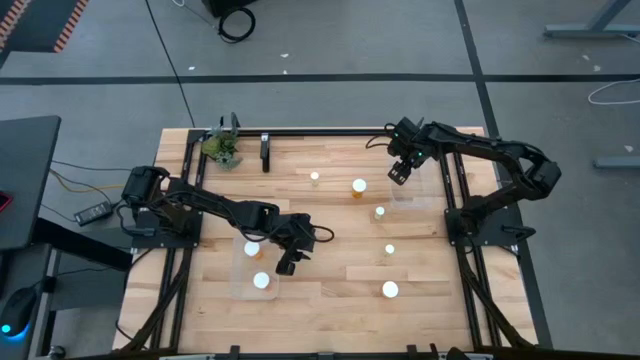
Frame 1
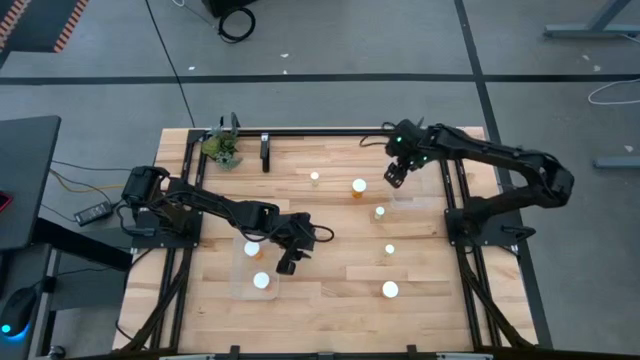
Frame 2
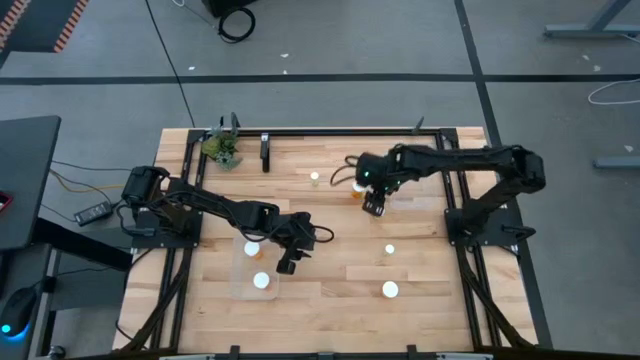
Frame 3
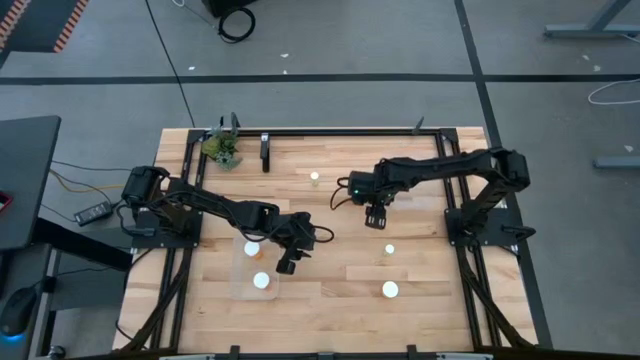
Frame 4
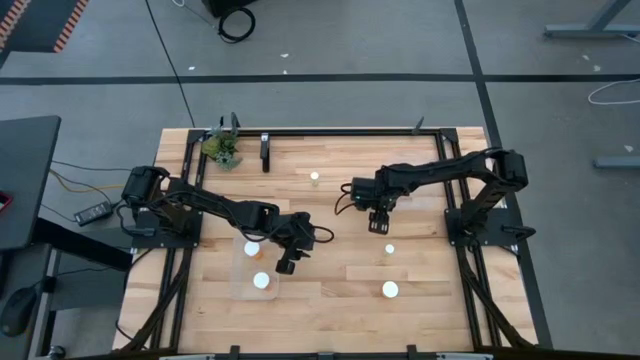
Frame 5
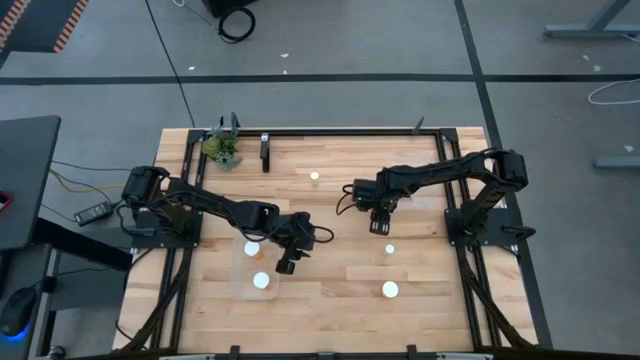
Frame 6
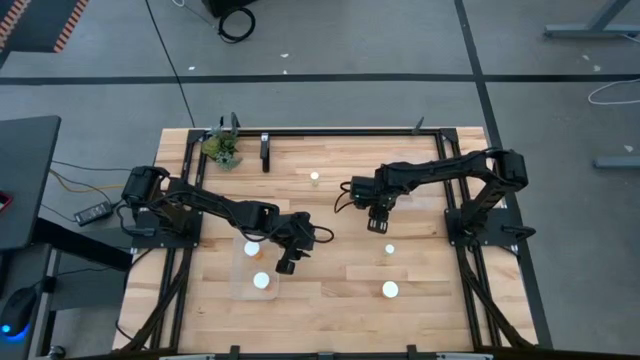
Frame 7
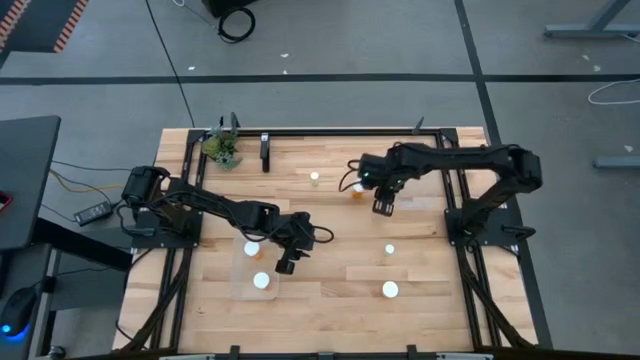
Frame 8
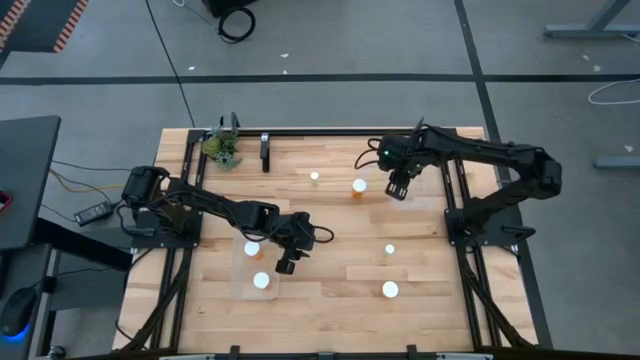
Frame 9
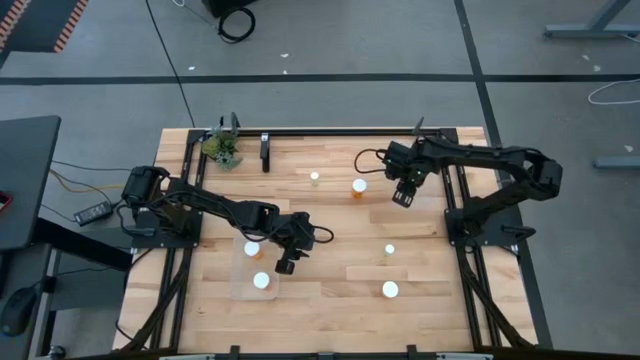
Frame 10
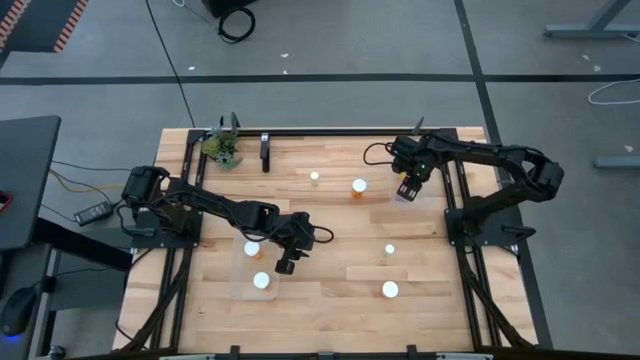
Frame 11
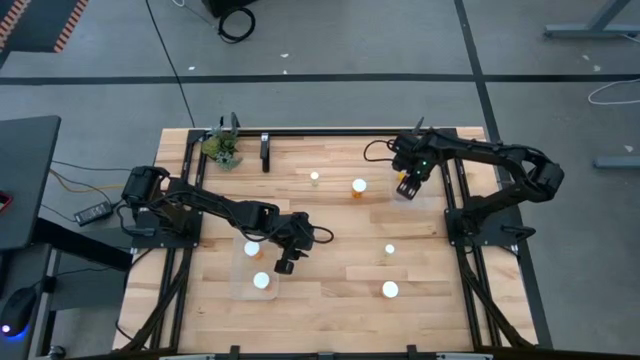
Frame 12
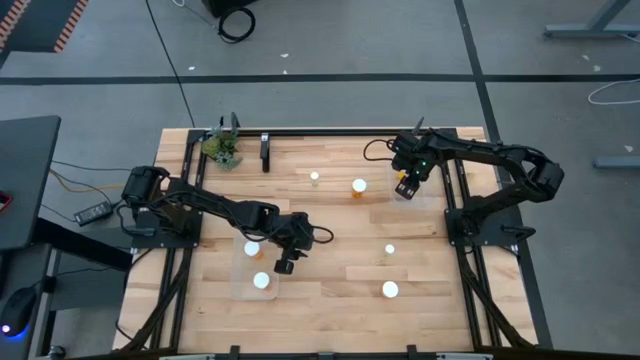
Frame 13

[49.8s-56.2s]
Task: Pick and place medicine bottles into bin by pill shape (circle, oval)
Put the middle yellow pill bottle into the top transparent bin

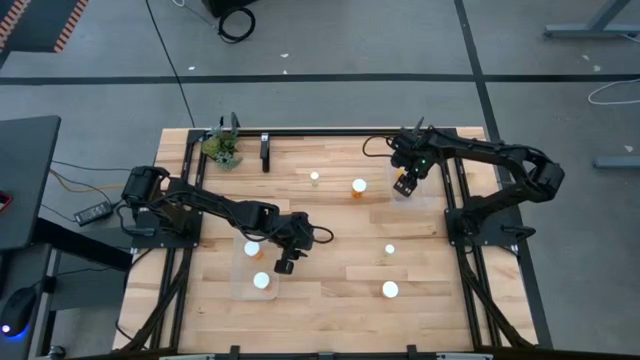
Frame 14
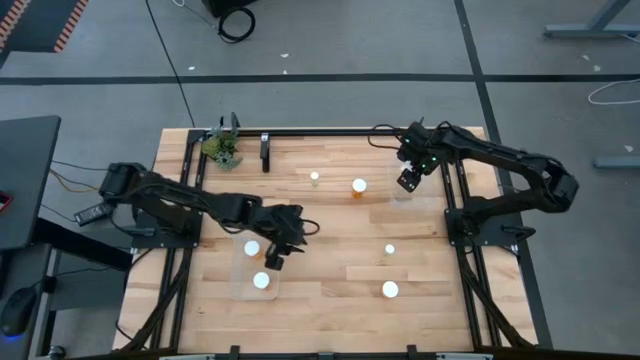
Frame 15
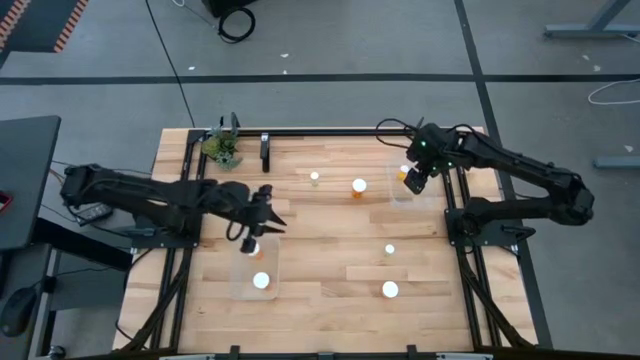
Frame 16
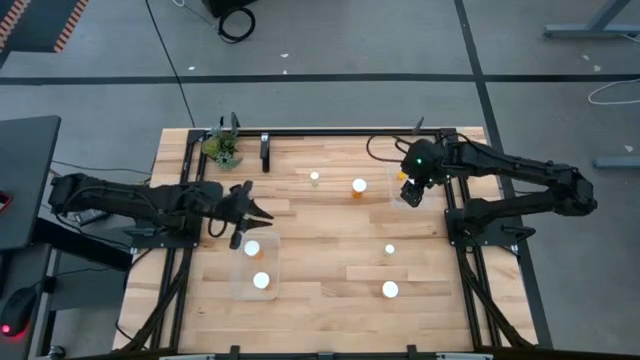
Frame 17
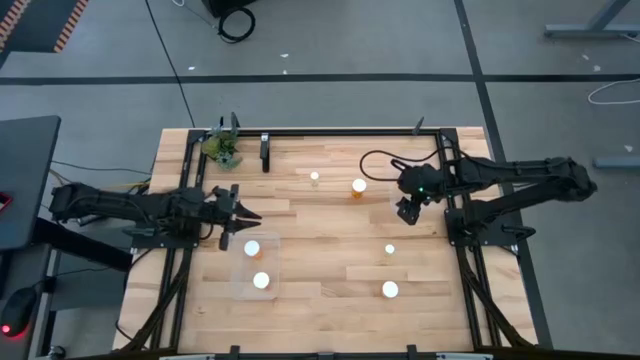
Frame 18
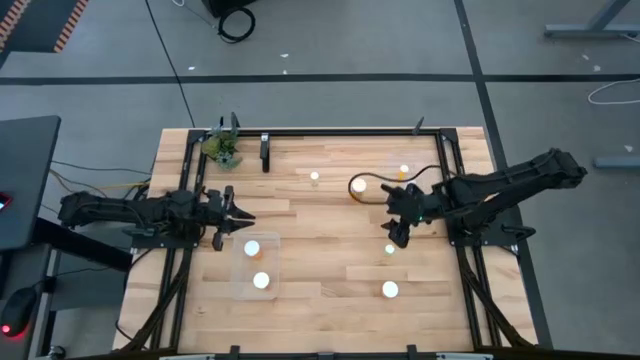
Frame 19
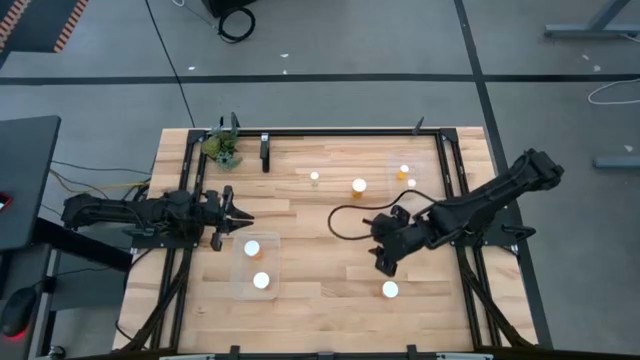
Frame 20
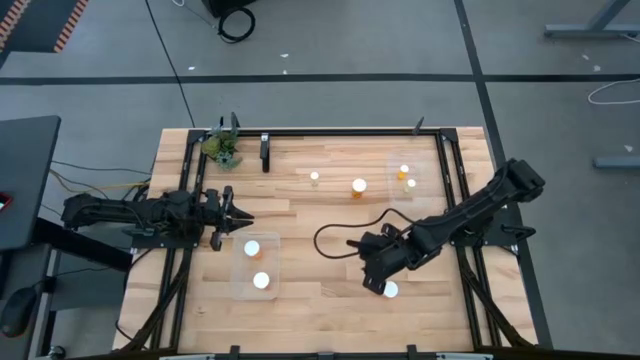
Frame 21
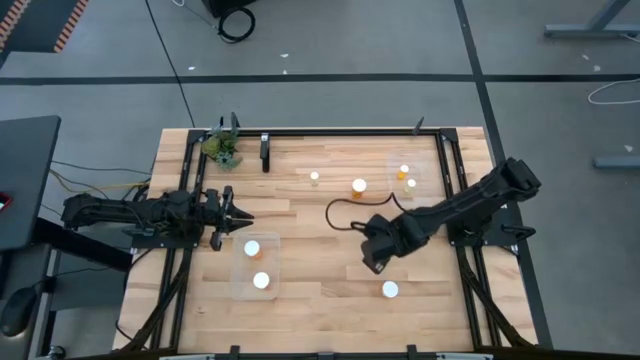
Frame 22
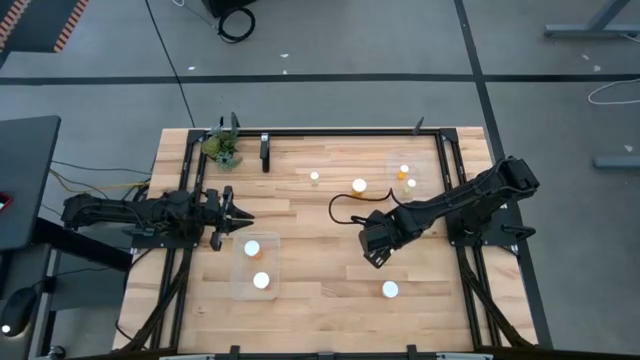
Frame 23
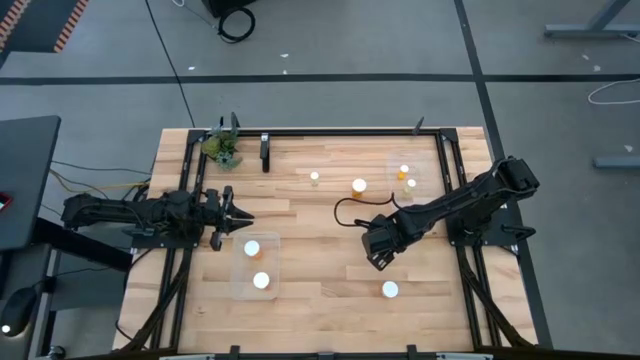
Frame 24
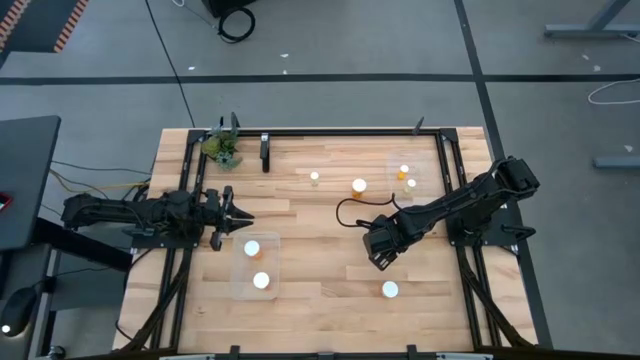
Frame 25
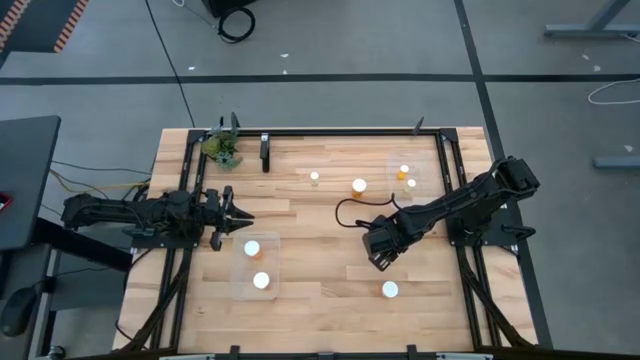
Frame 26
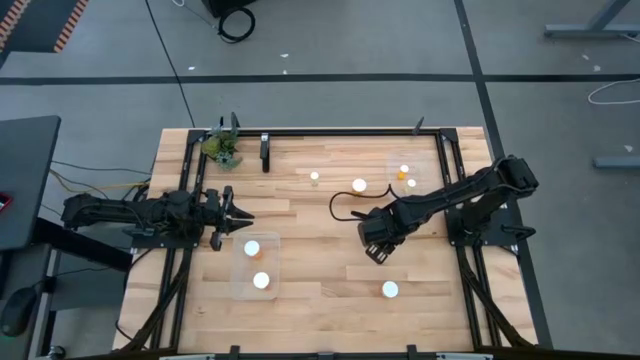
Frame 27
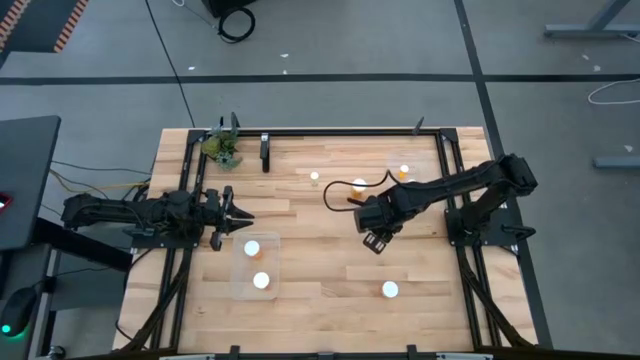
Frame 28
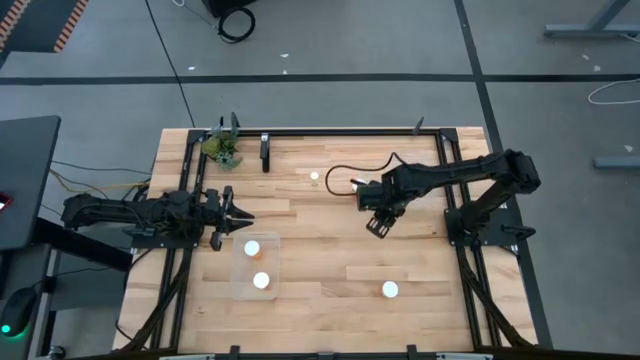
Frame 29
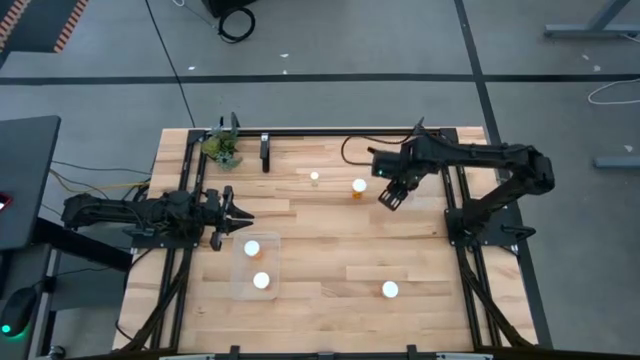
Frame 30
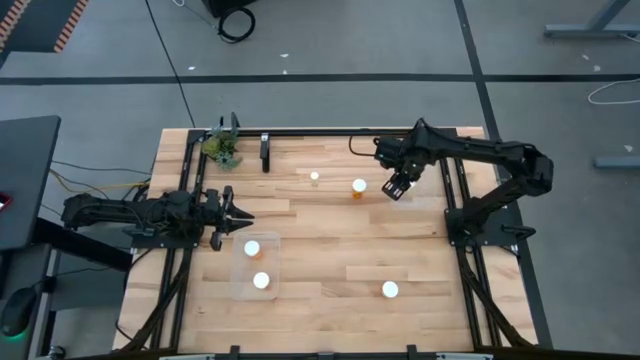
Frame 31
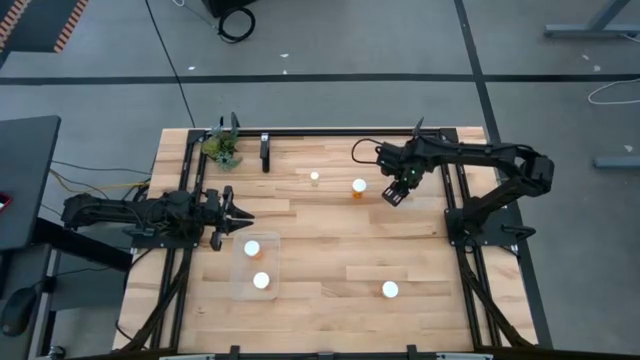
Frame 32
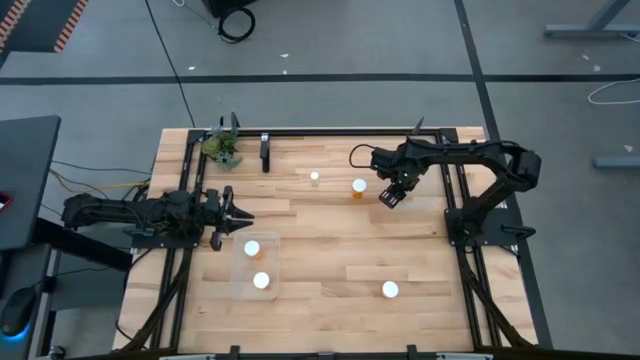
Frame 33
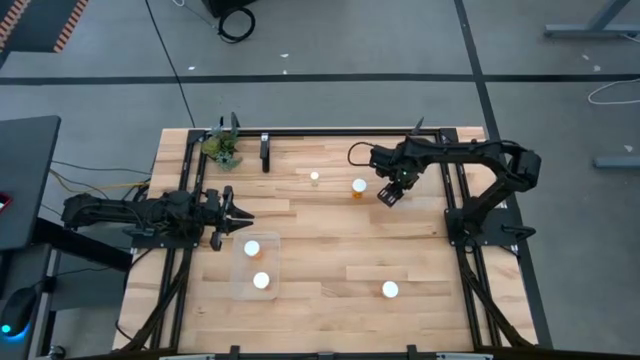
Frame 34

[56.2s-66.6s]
Put the bottom yellow pill bottle into the top transparent bin

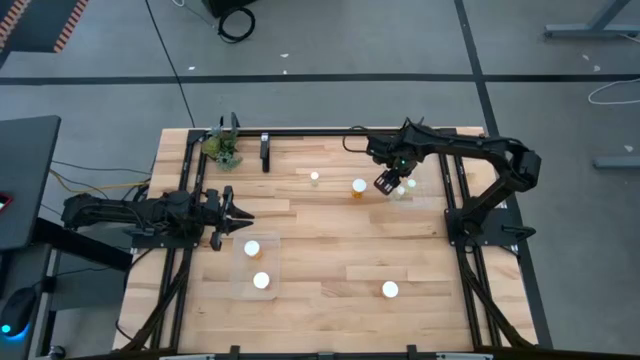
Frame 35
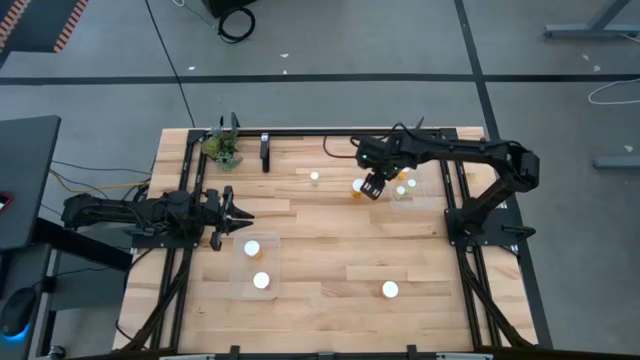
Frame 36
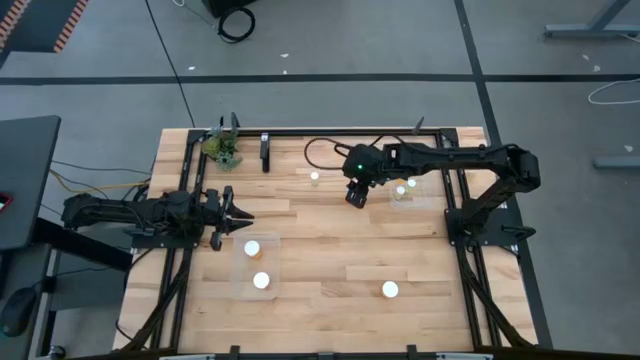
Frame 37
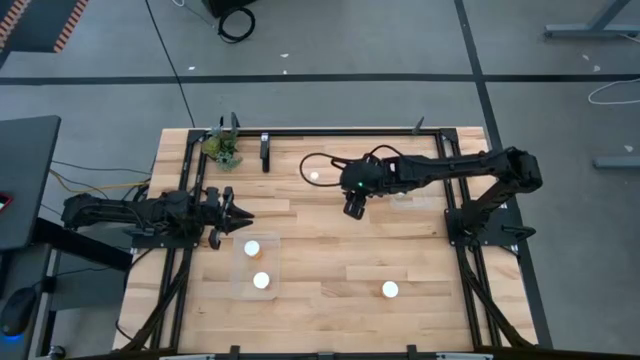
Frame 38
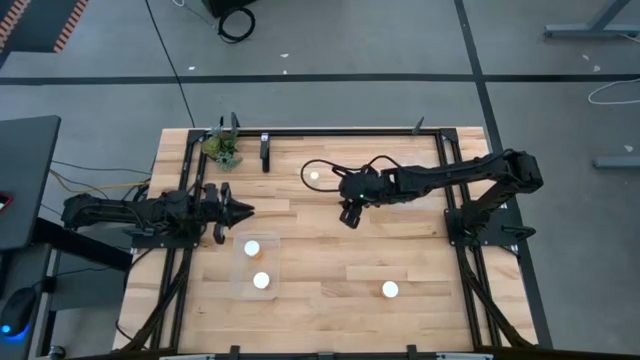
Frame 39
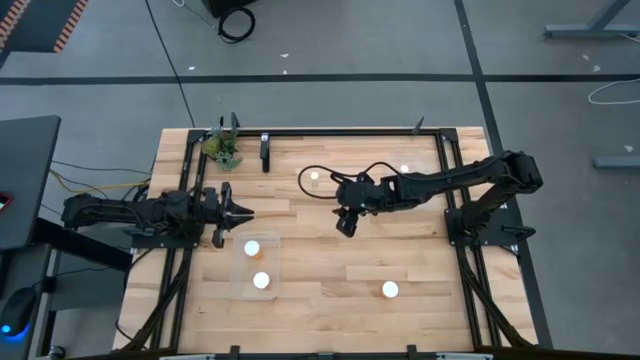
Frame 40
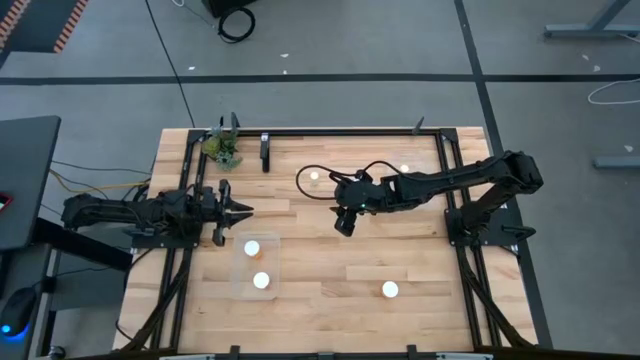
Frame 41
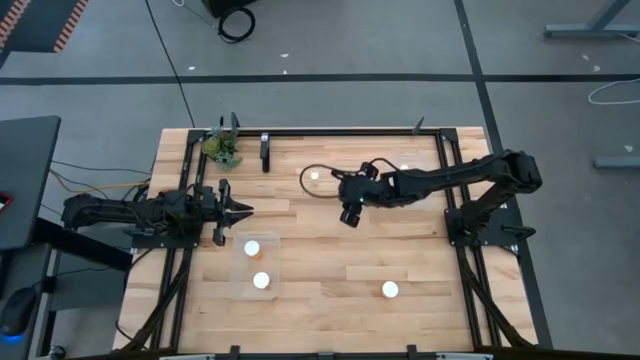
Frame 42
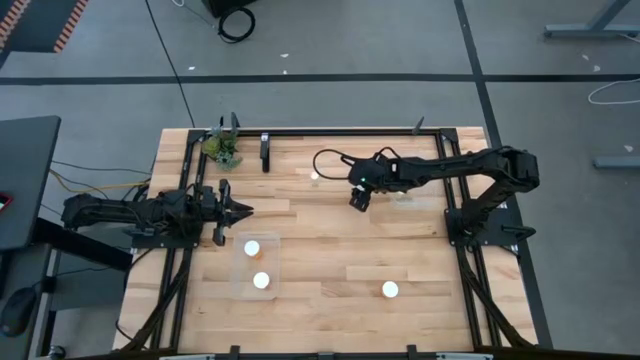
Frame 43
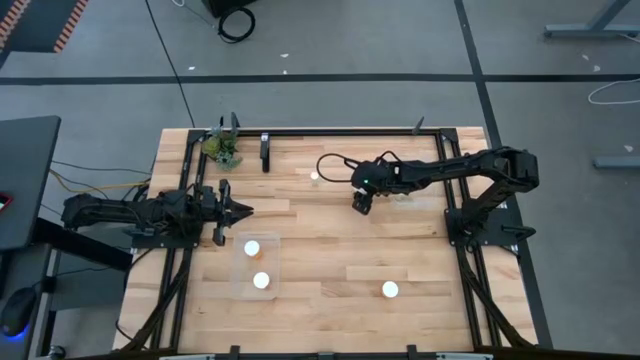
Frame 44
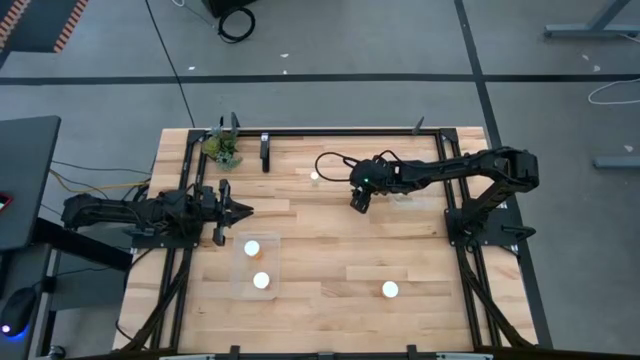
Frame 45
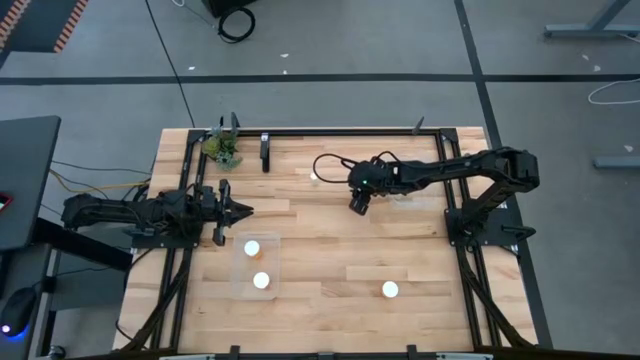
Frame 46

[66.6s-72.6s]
Put the large orange pill bottle into the bottom transparent bin
